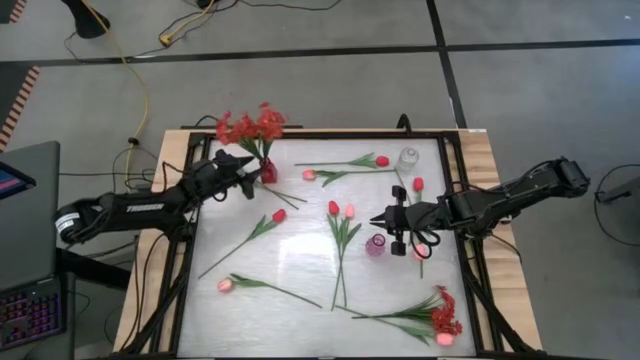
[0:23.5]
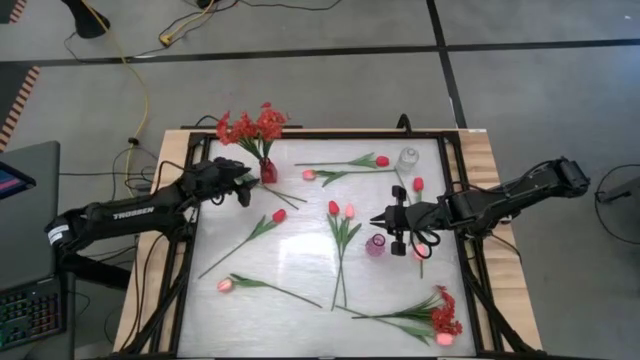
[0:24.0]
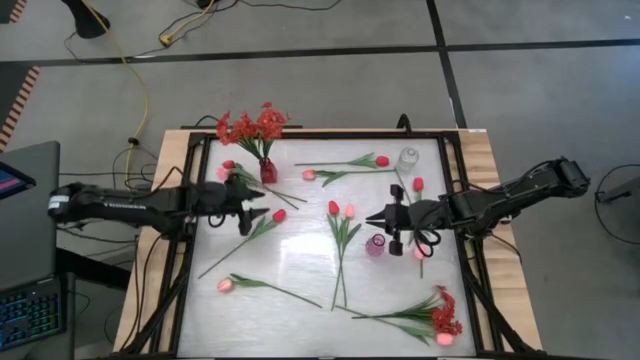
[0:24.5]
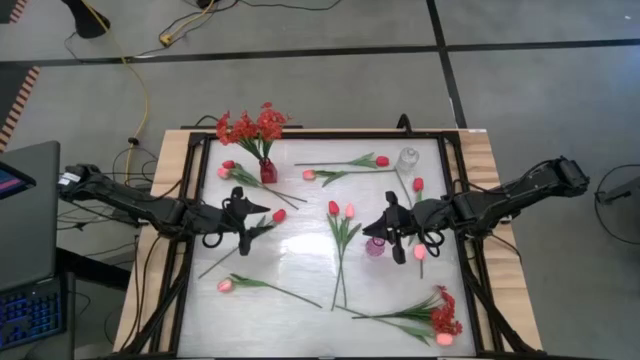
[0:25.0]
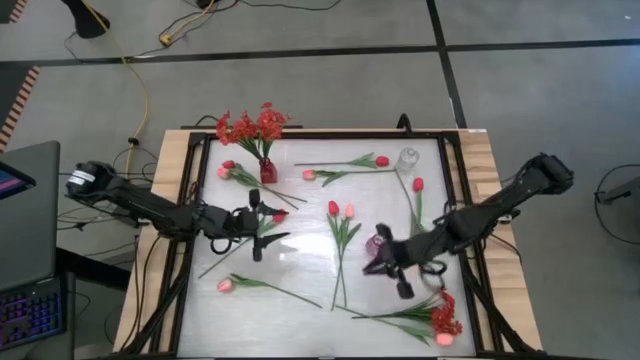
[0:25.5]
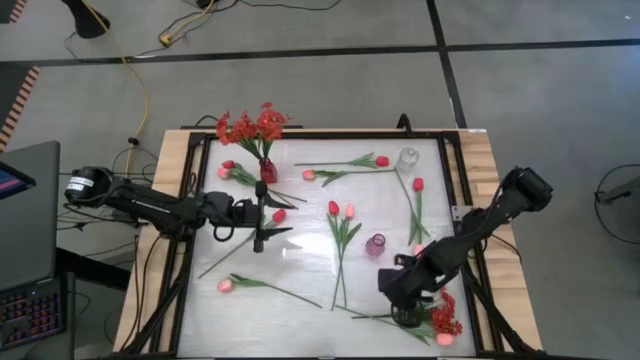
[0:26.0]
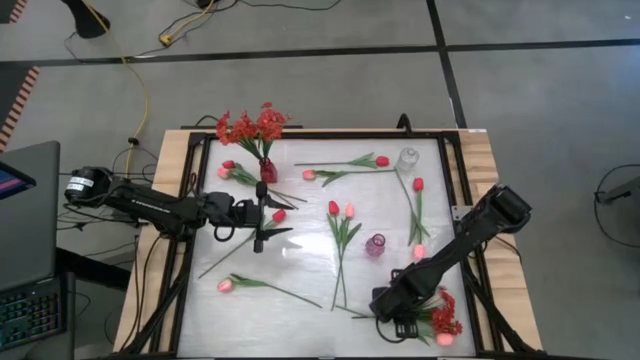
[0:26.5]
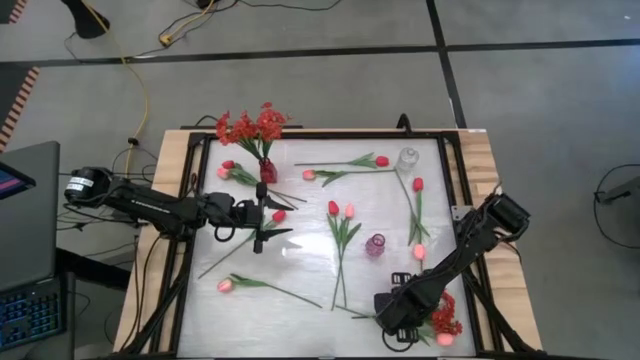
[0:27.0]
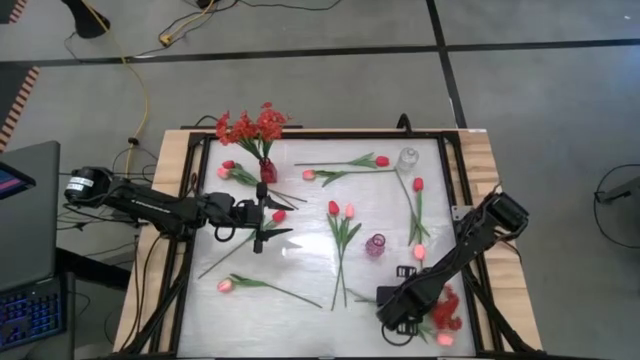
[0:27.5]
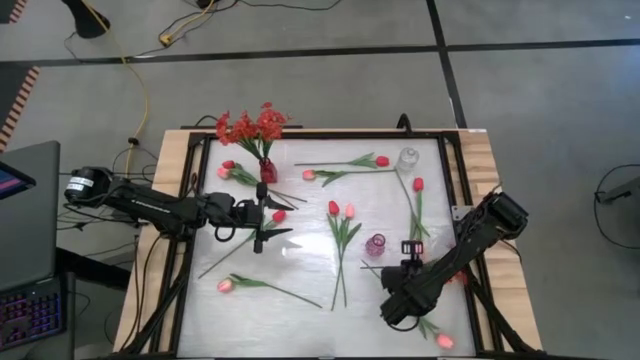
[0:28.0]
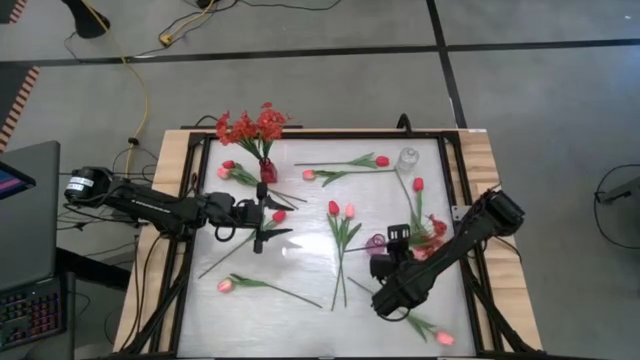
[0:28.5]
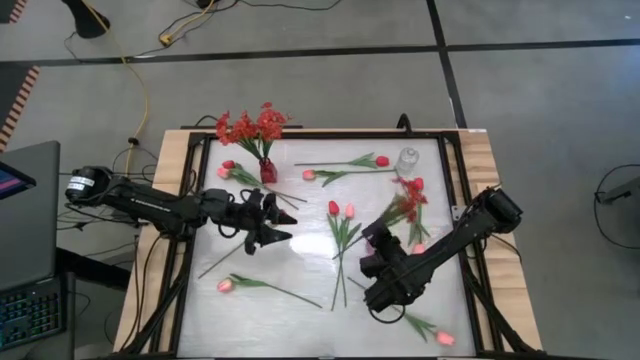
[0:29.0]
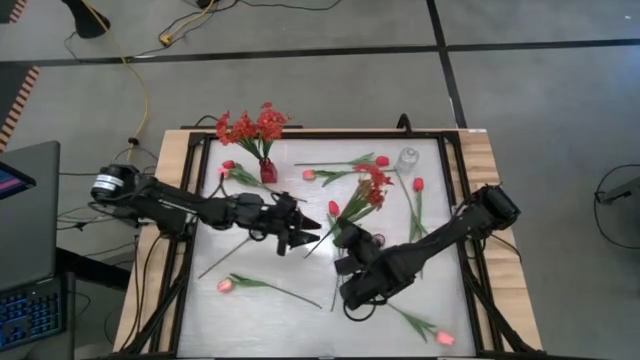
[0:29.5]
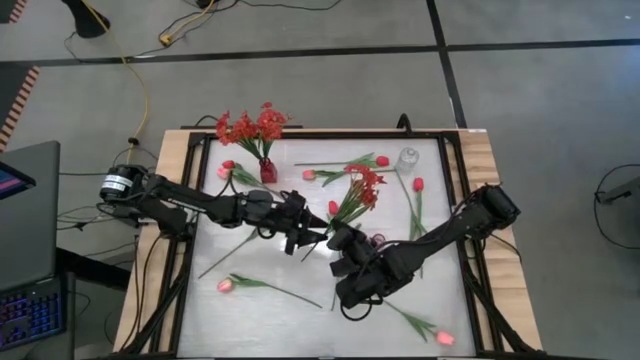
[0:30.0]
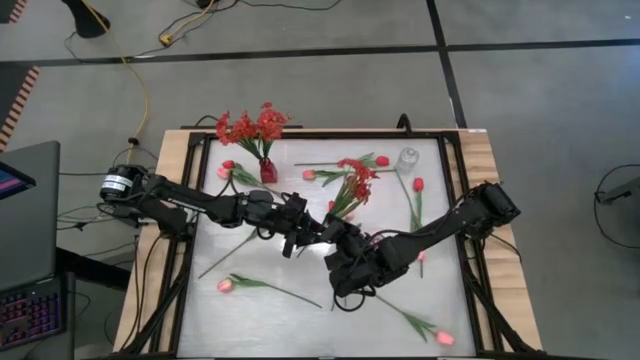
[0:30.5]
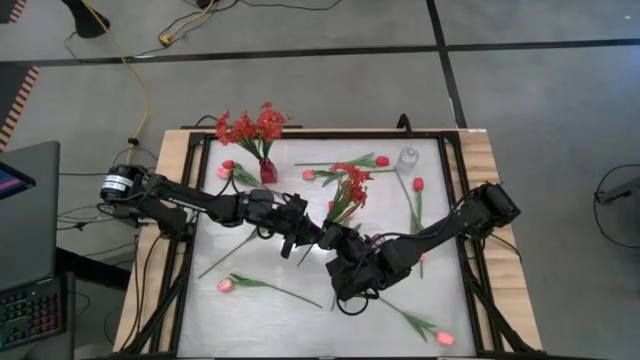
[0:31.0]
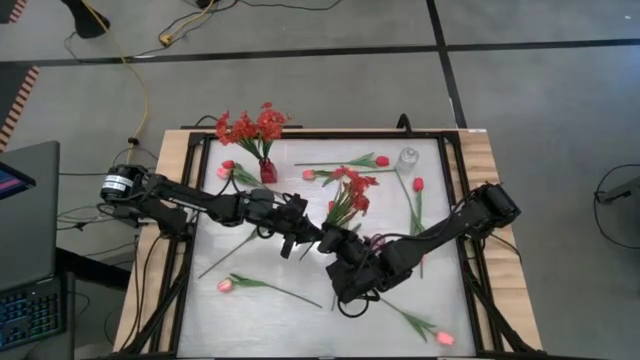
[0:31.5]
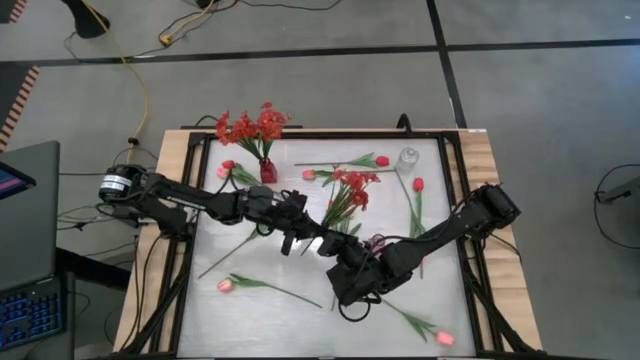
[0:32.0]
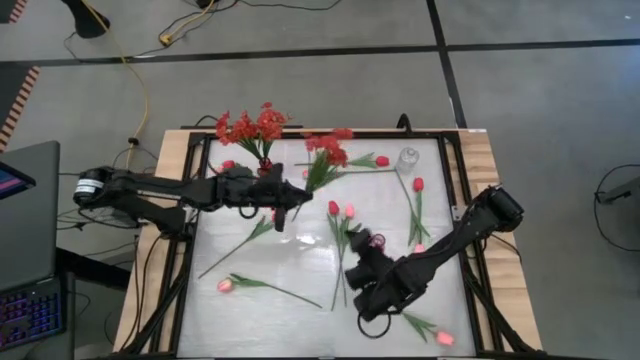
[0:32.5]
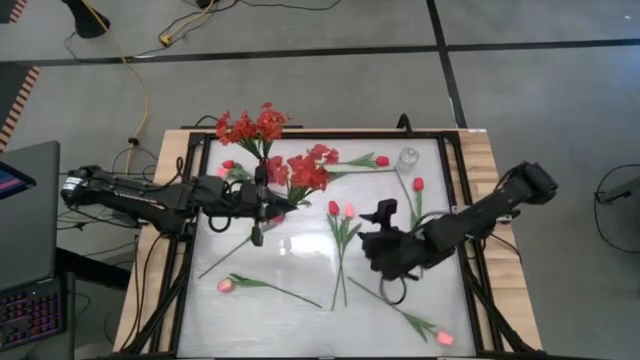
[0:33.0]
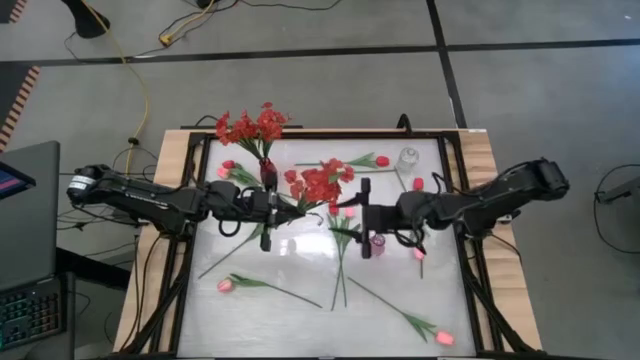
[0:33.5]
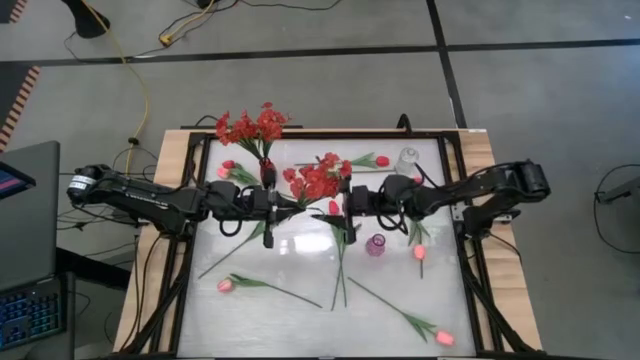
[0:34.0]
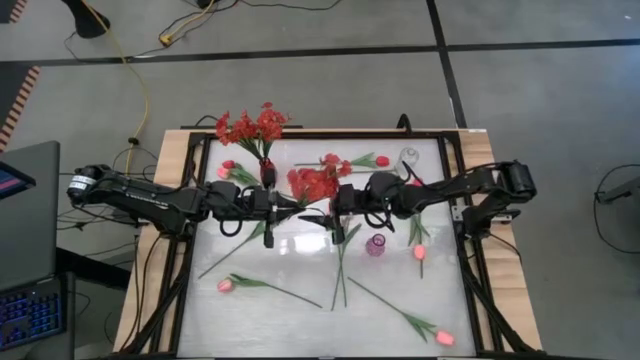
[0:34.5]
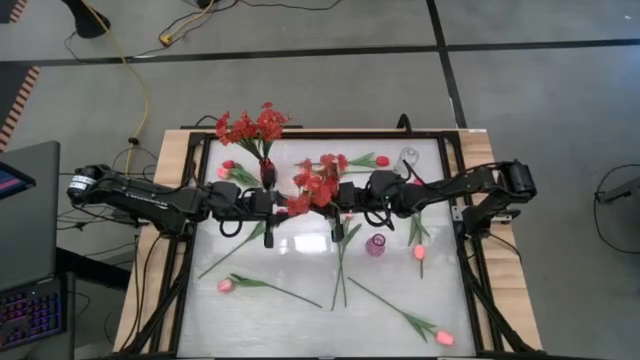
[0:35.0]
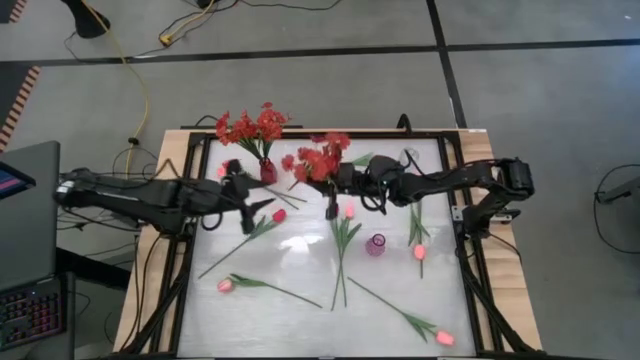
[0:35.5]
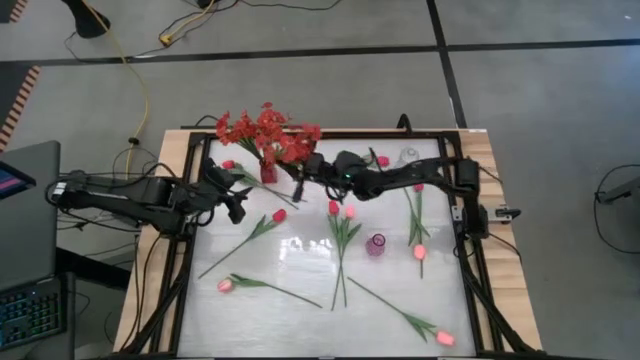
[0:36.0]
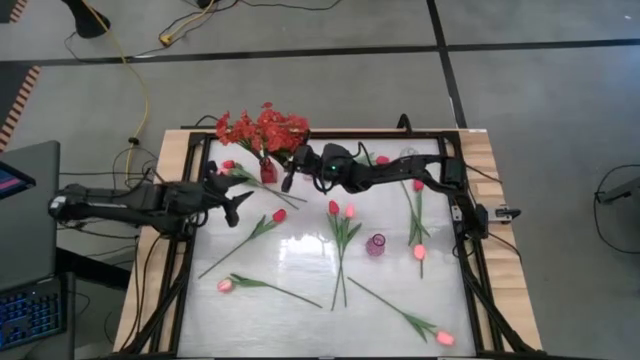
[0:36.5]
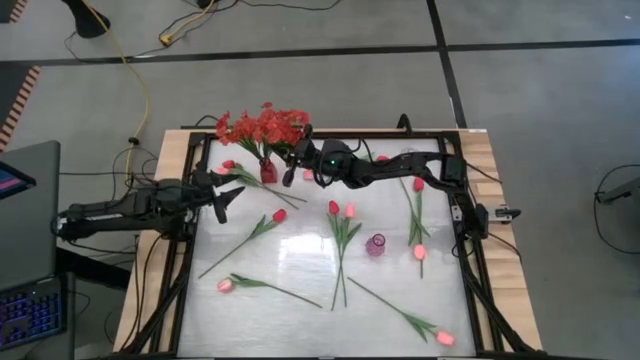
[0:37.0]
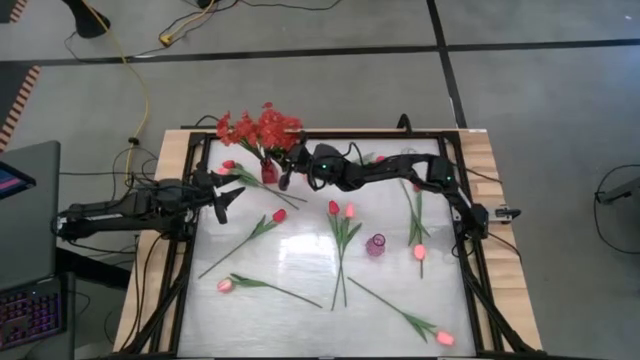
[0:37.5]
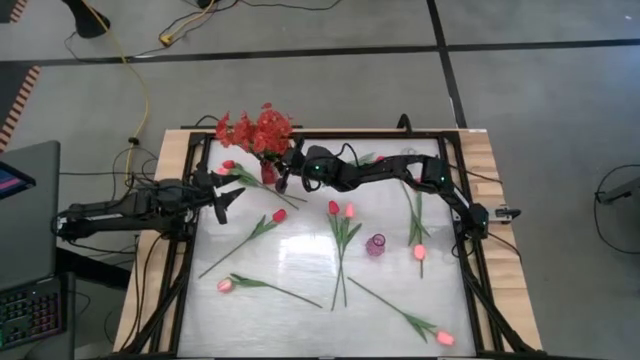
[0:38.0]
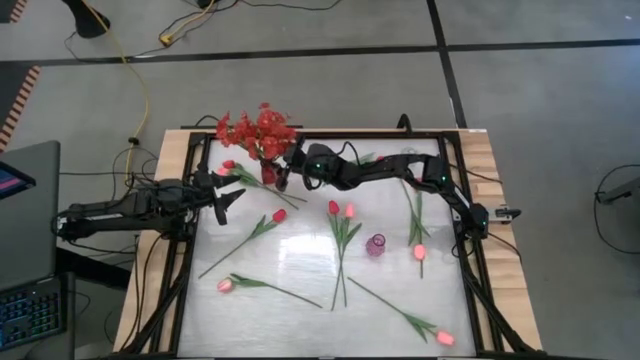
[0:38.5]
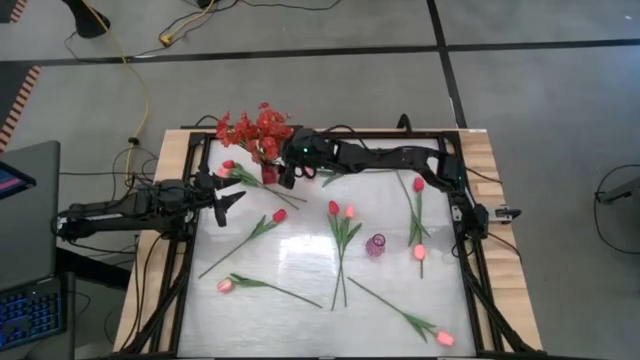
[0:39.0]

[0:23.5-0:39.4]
Task: Sort flowers into vase by color
Put the orange flowers into the red flower vase

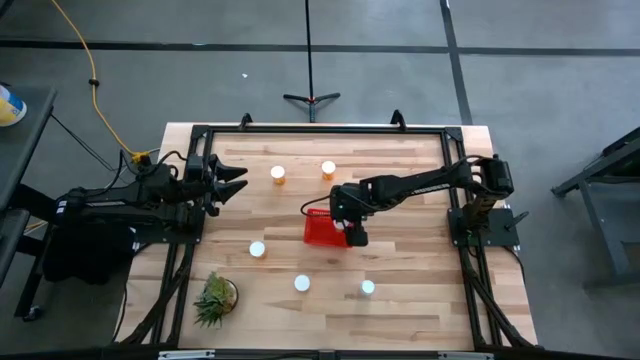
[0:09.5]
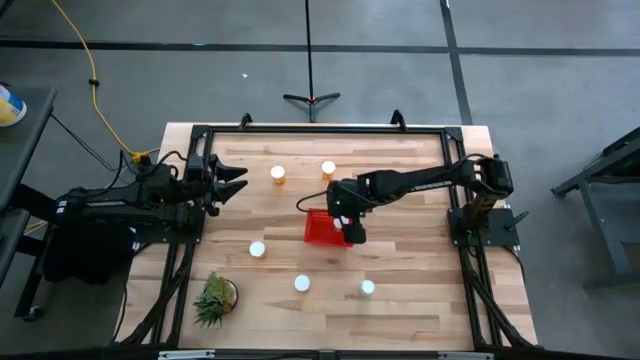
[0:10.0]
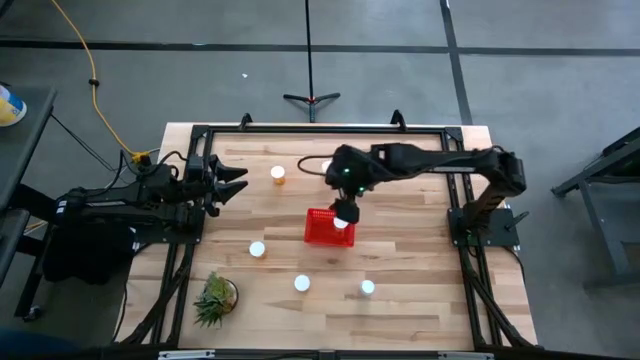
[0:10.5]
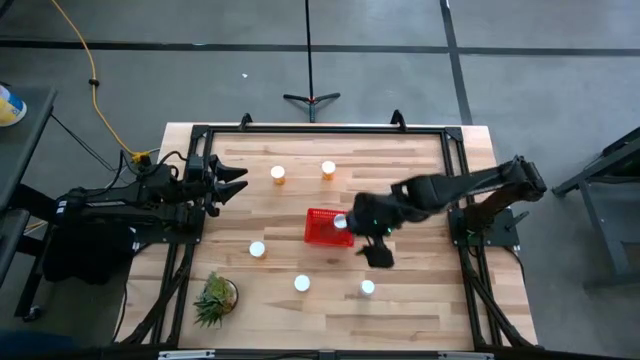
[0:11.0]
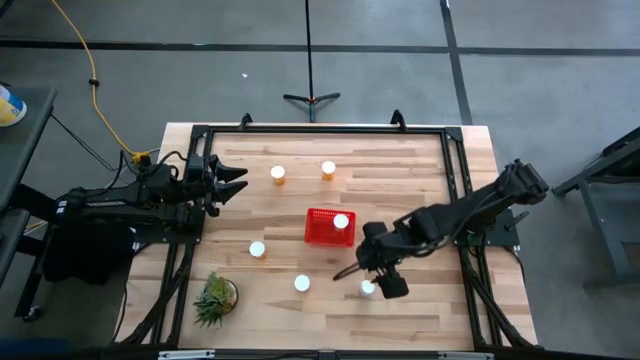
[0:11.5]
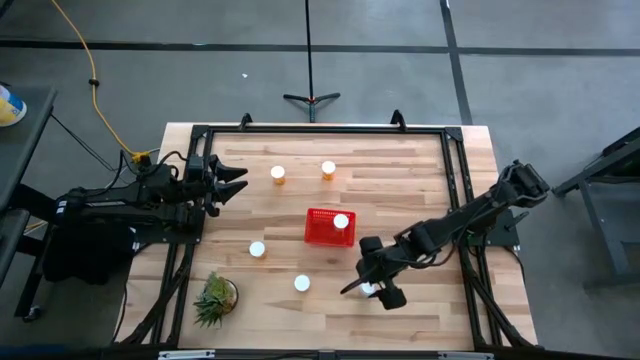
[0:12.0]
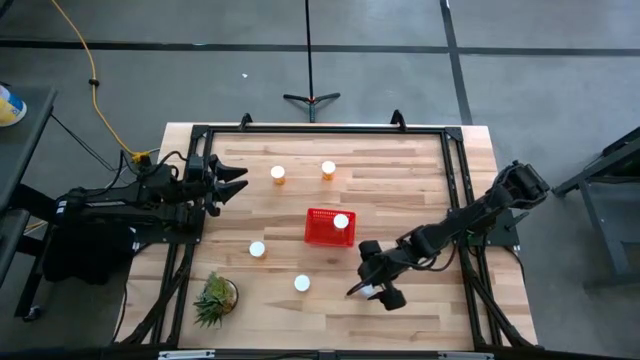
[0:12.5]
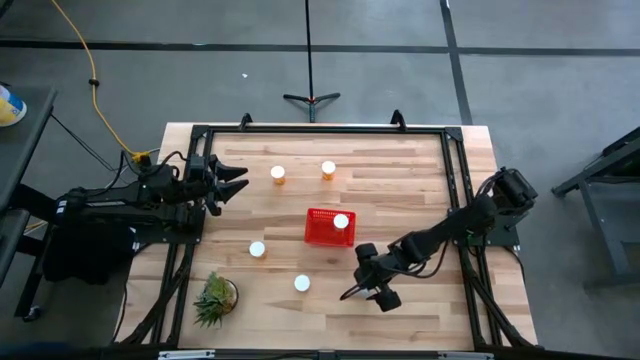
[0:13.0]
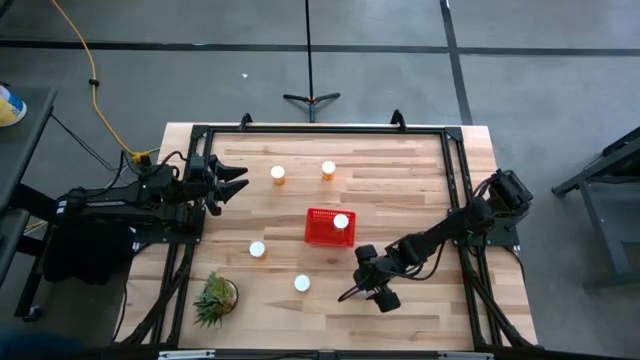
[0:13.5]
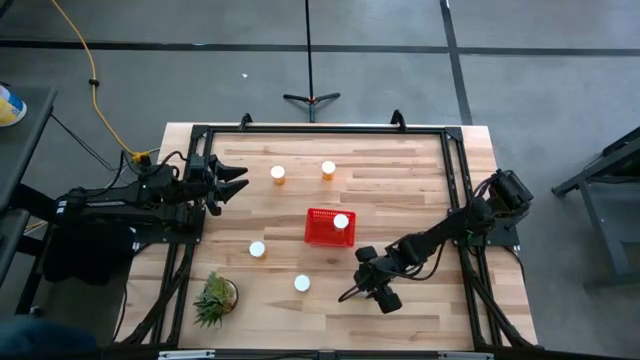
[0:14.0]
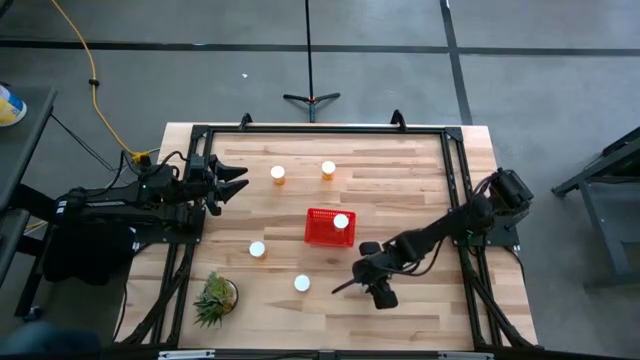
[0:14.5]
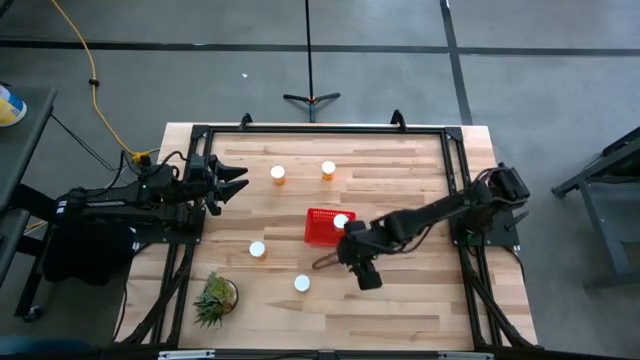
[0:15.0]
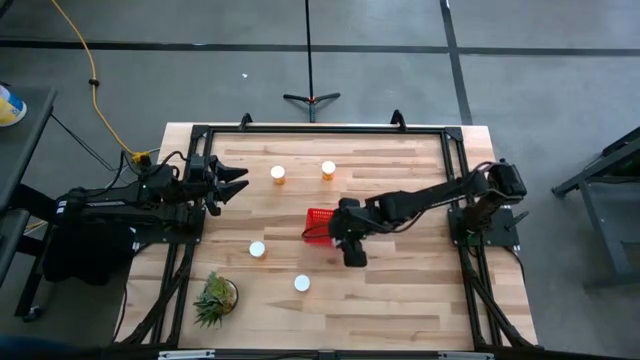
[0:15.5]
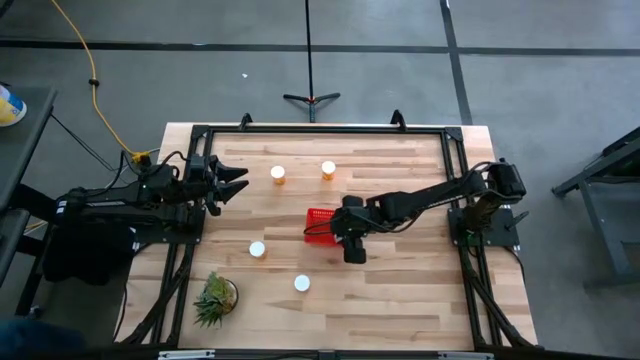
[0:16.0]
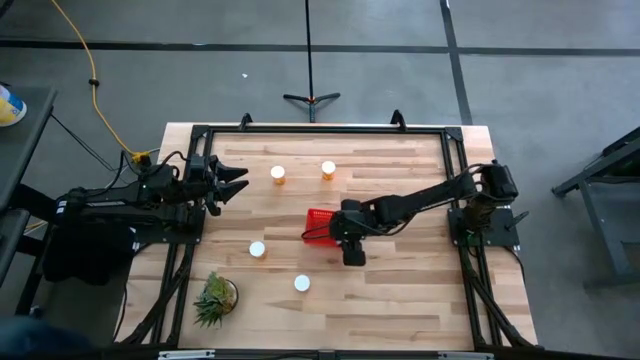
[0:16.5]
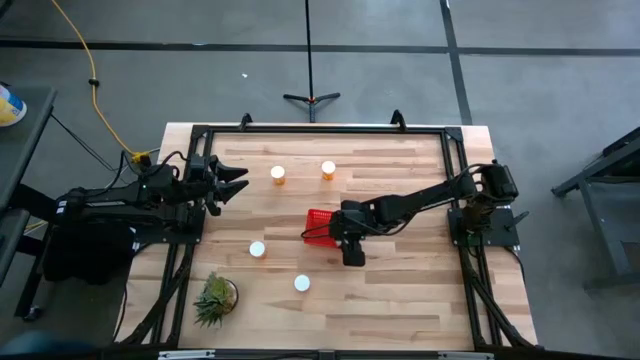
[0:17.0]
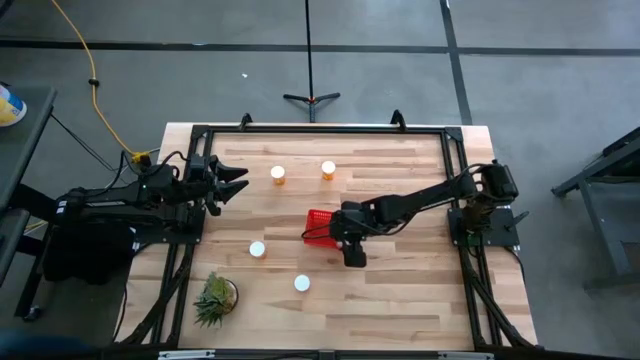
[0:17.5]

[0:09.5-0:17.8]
Task: Pick and place pill bottles into a basket
Put the white pill bottle into the red bin
